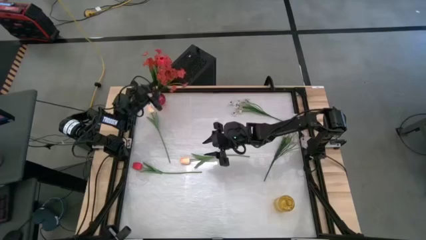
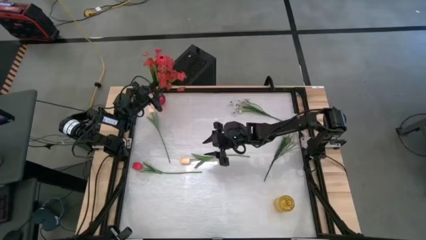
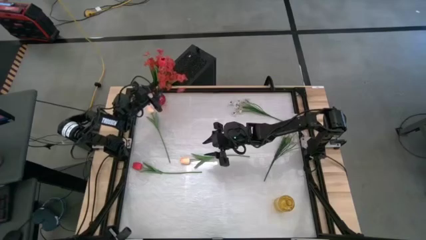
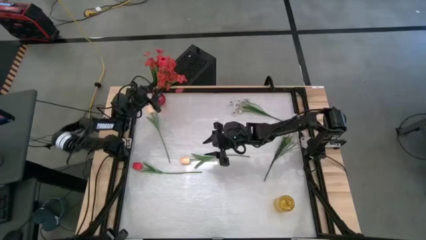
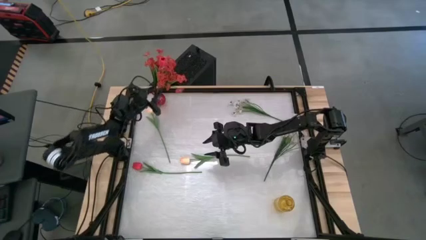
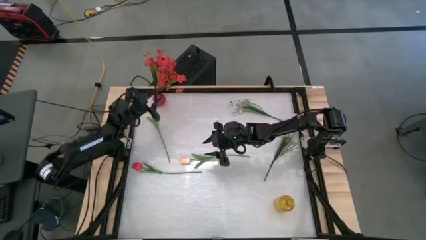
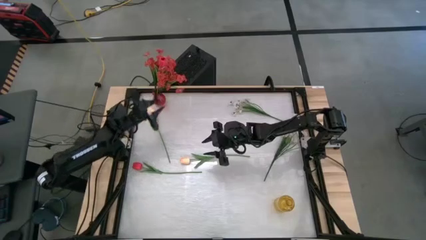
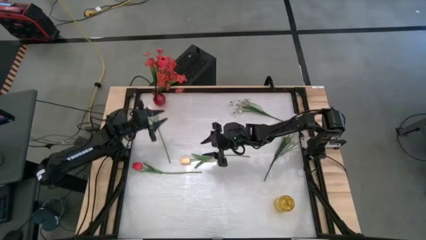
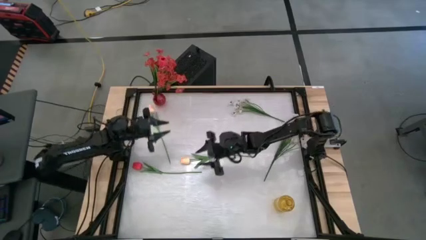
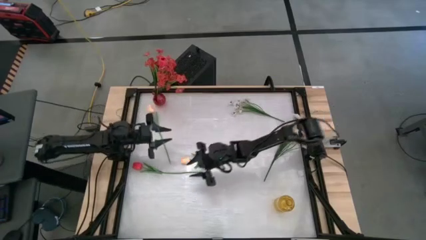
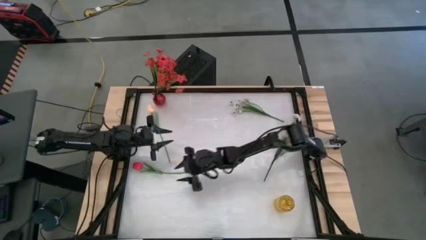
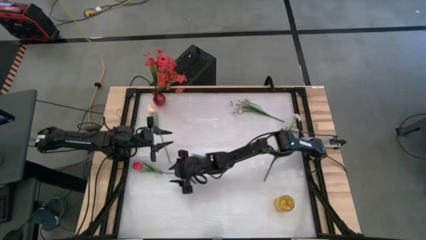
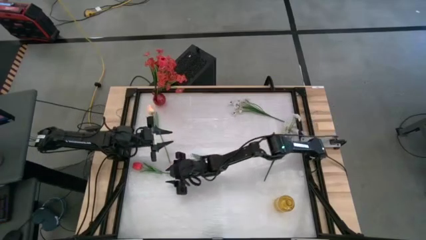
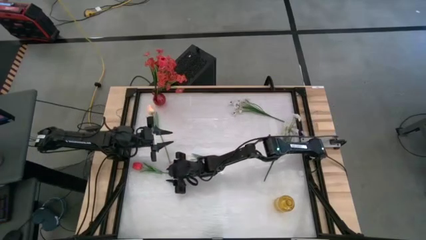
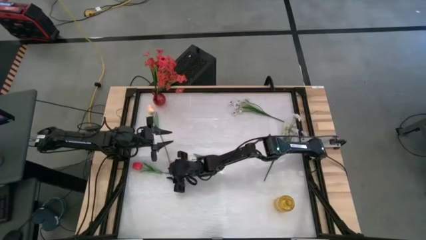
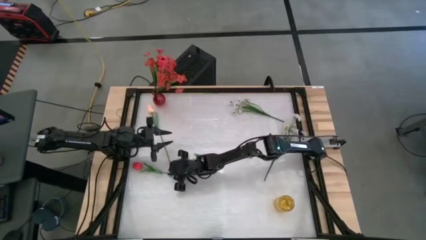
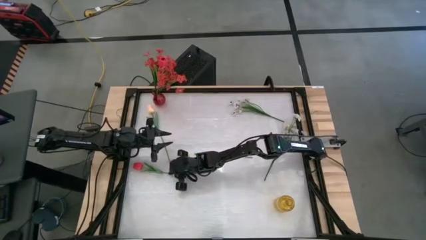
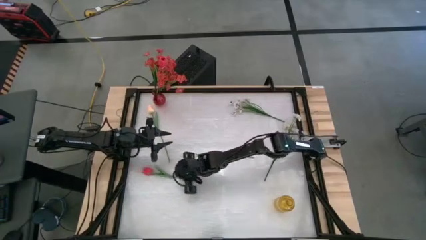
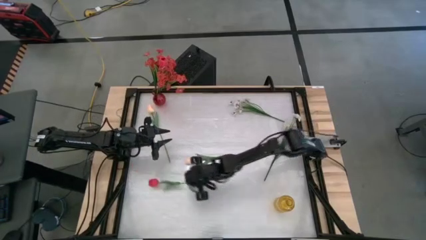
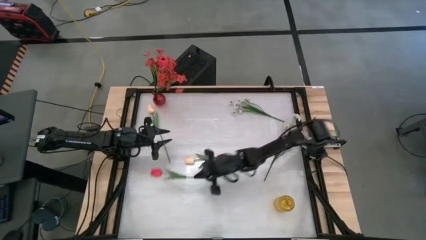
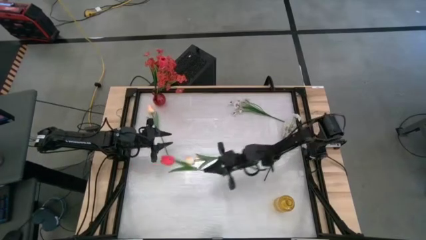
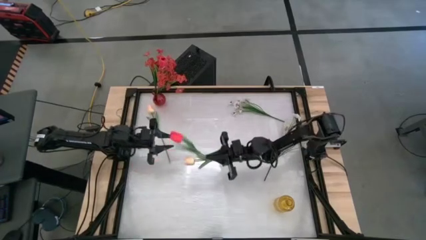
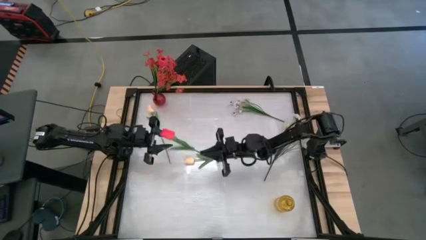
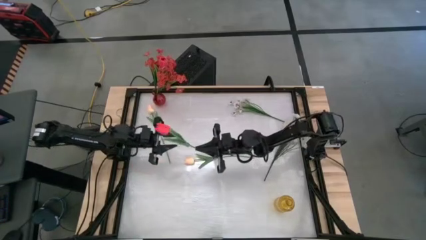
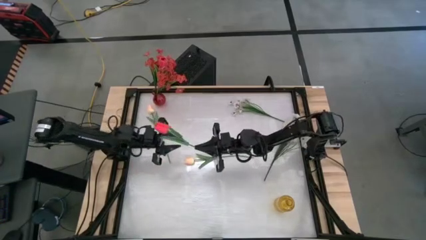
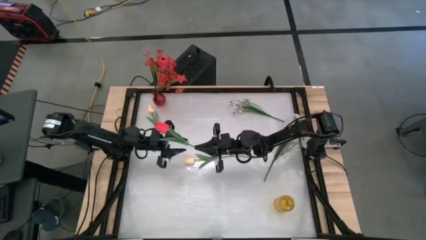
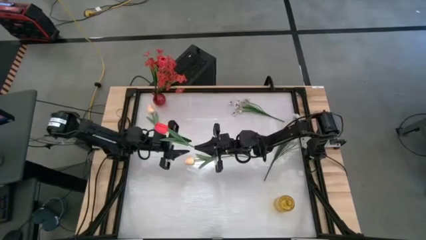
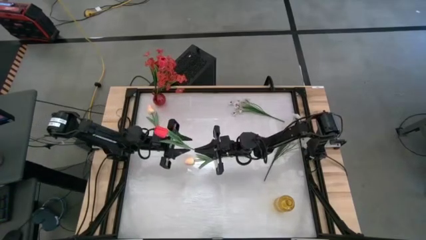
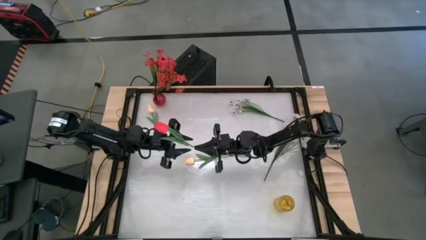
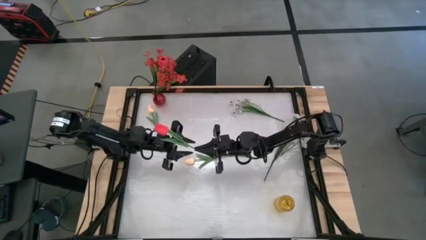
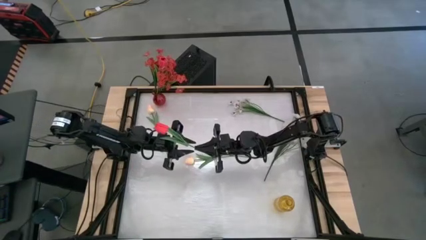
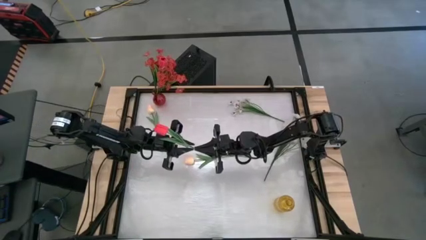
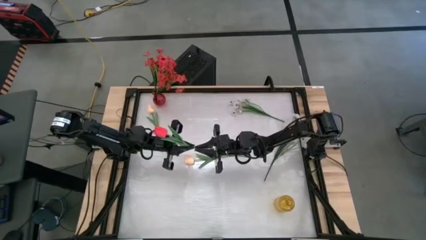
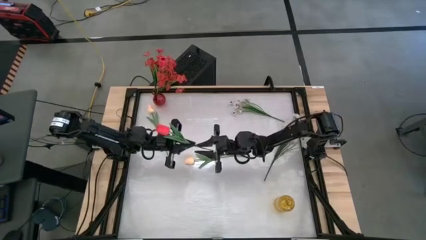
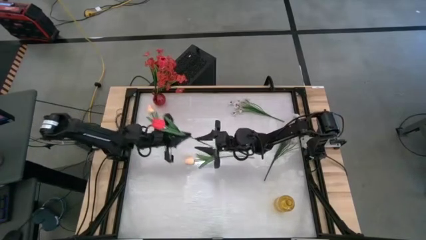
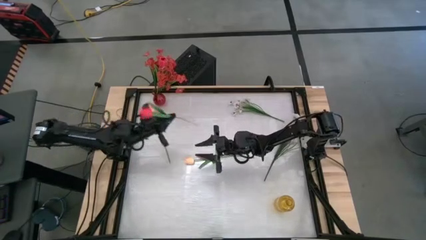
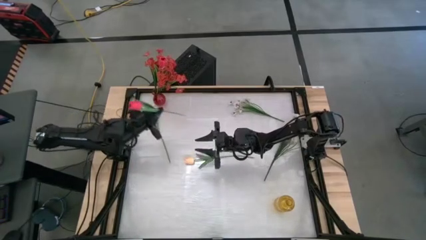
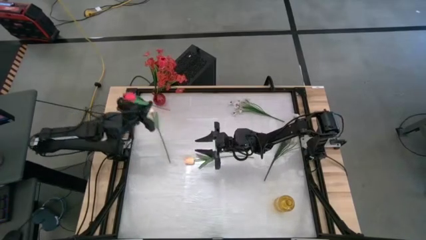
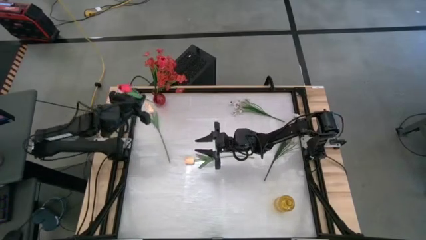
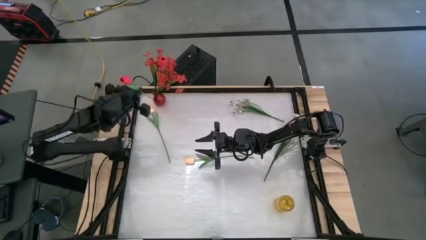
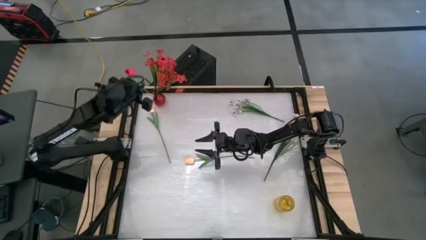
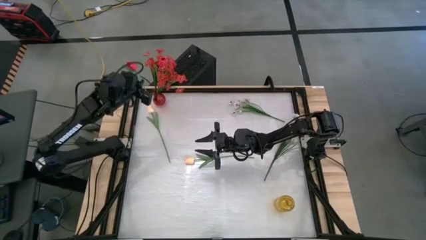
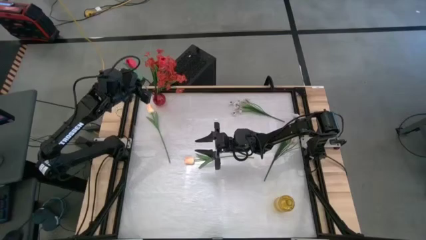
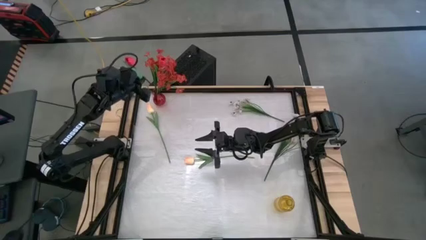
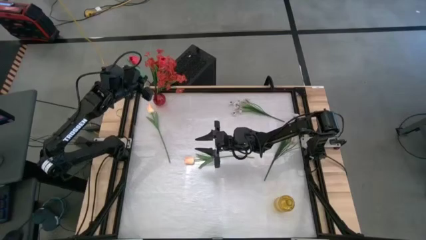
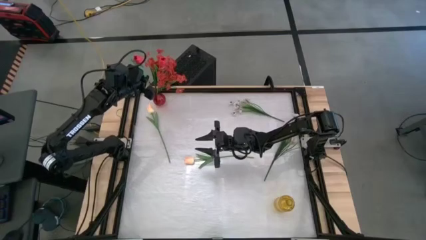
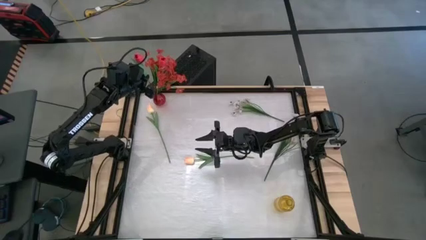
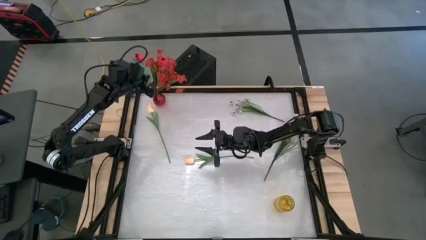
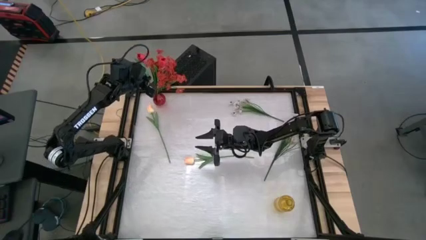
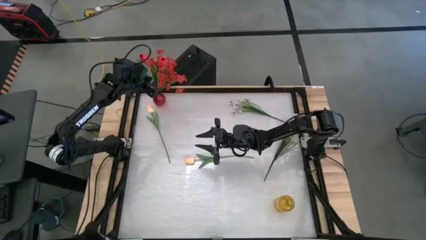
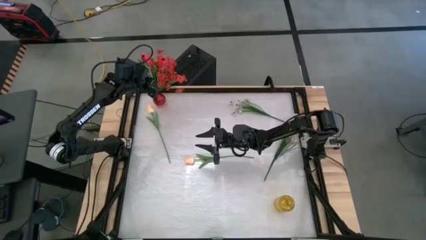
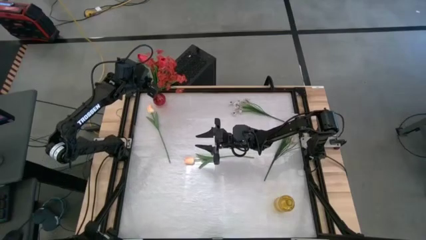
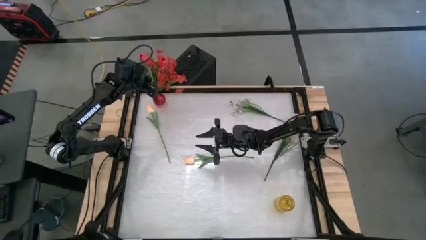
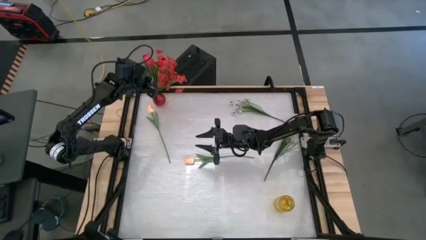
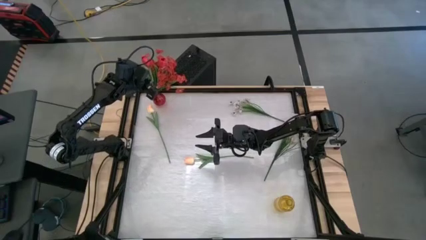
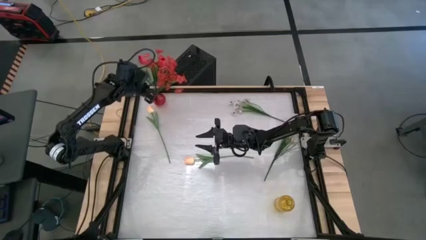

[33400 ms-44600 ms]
Task: Sort flowers into vase by color
Put the pink flower into the transparent red vase

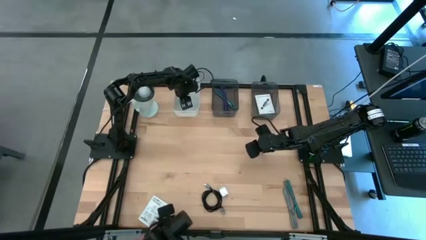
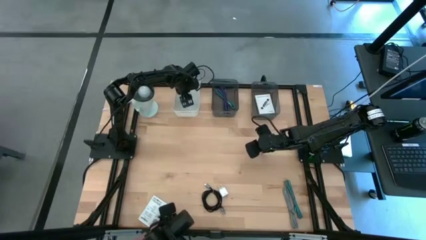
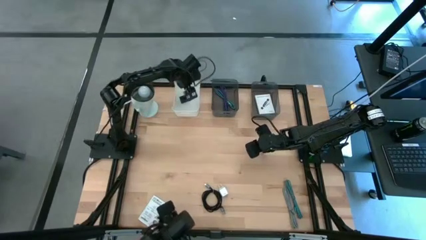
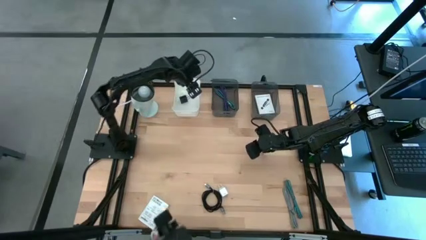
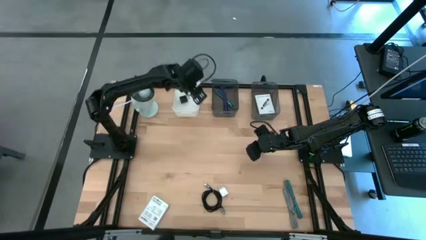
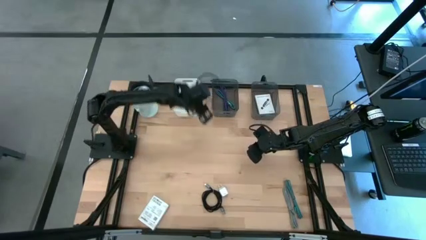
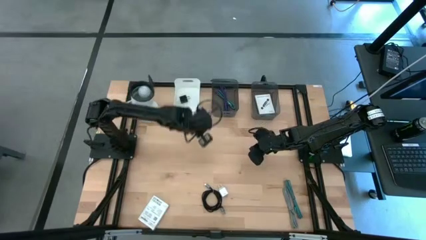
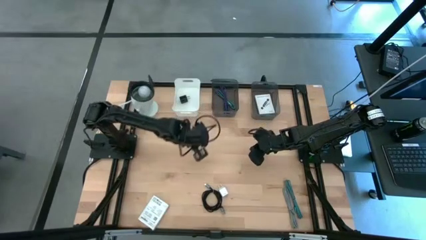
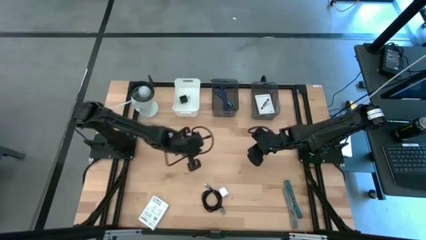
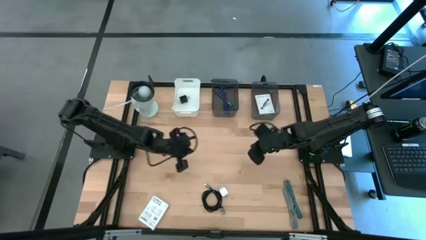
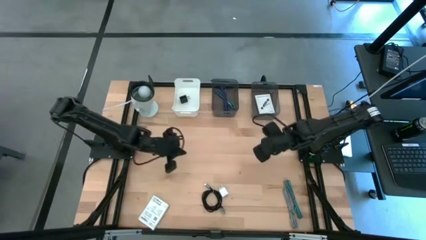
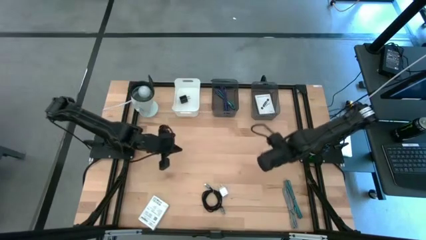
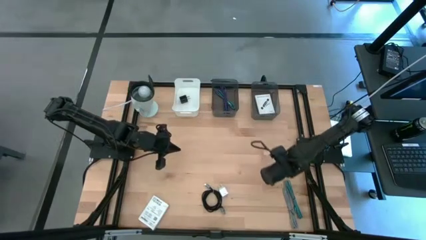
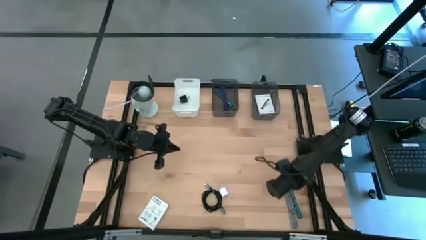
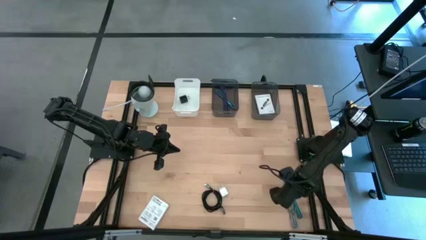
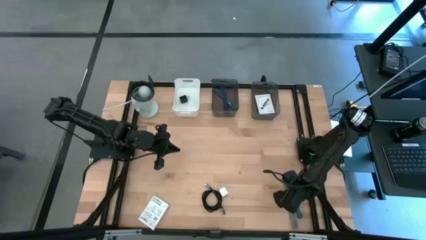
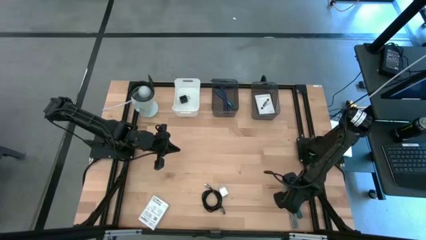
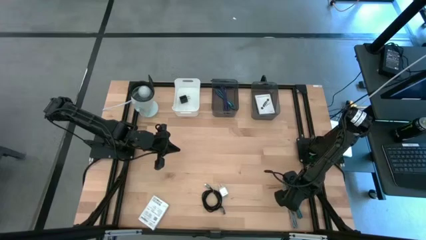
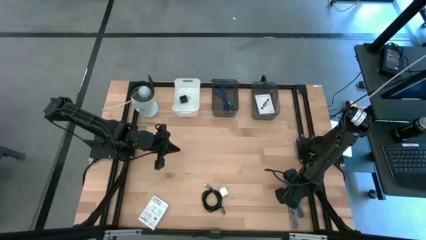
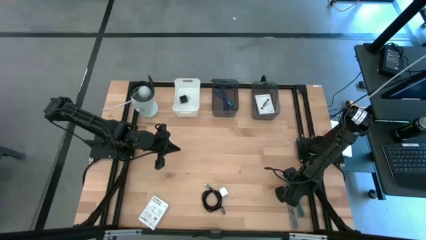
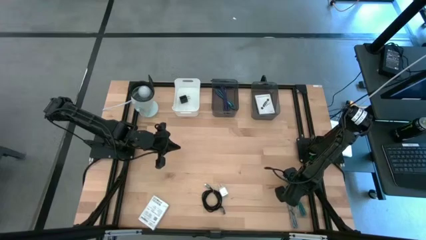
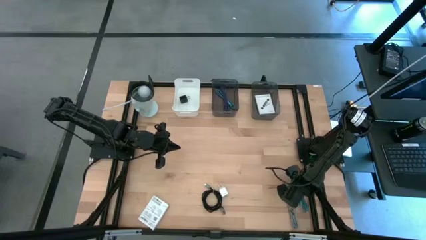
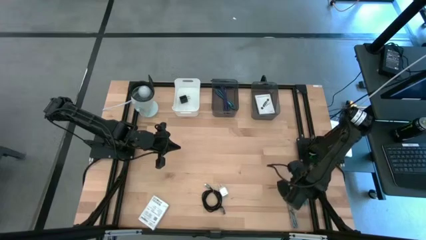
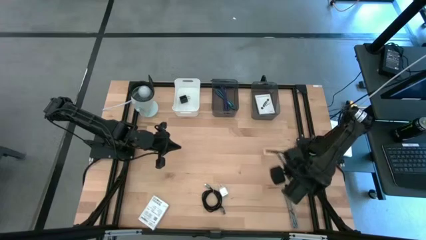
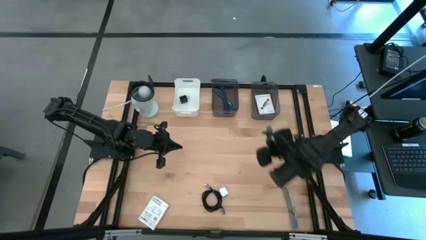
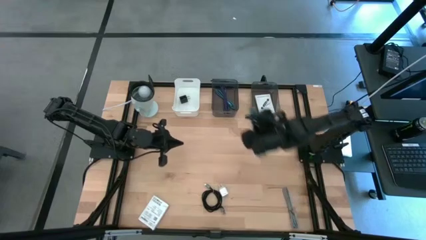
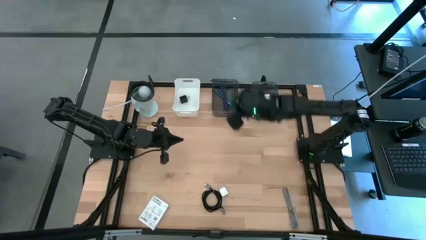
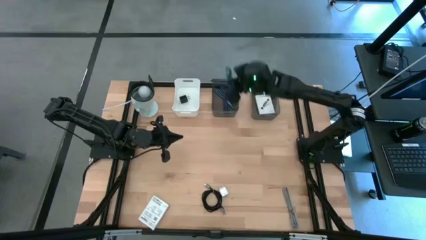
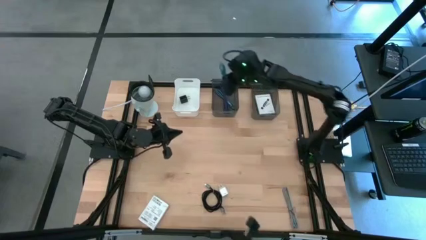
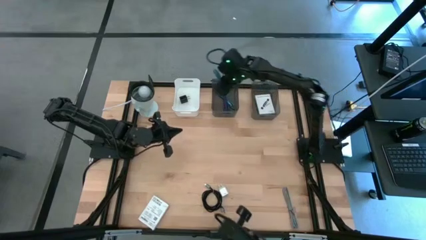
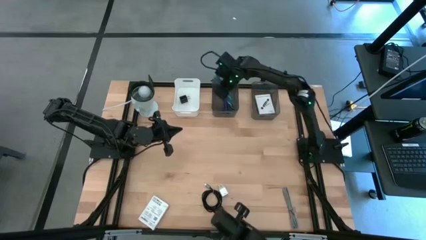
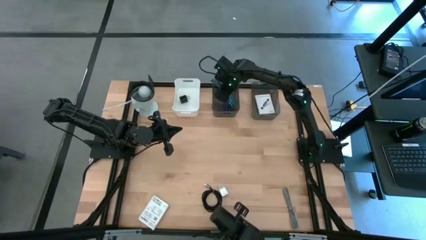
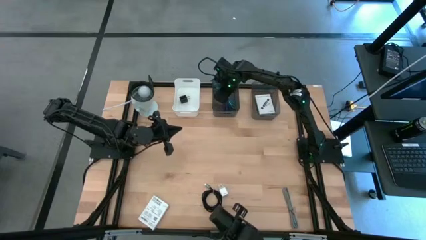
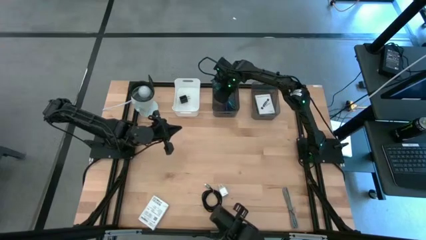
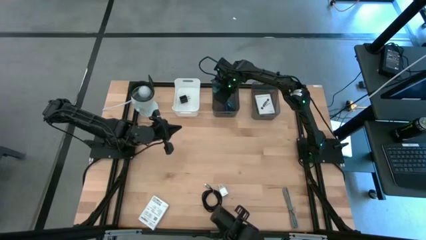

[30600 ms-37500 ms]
Task: Pick and place items into bin
Put the blue charger cable into the left black bin
